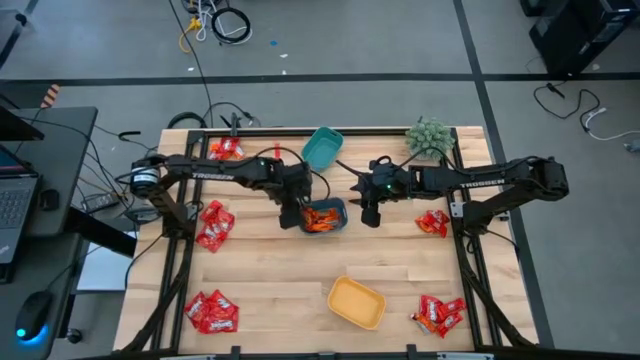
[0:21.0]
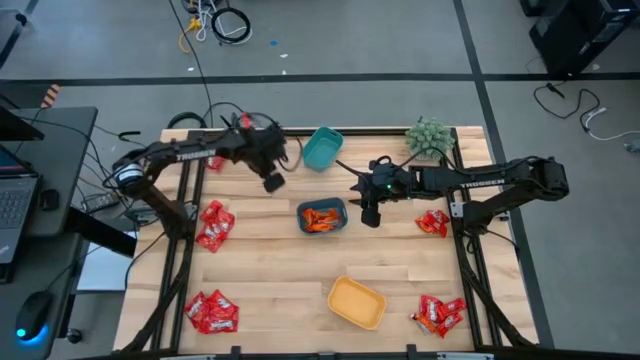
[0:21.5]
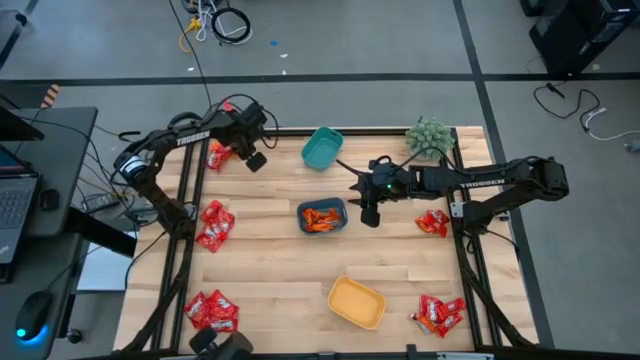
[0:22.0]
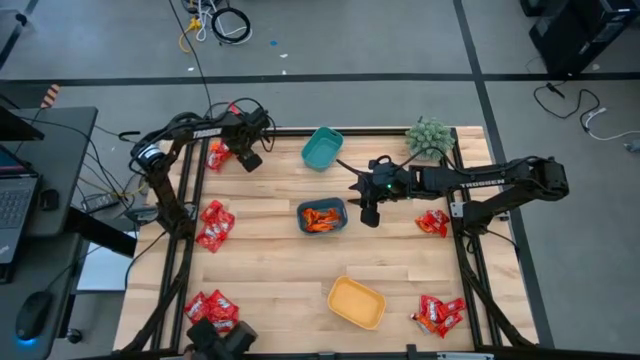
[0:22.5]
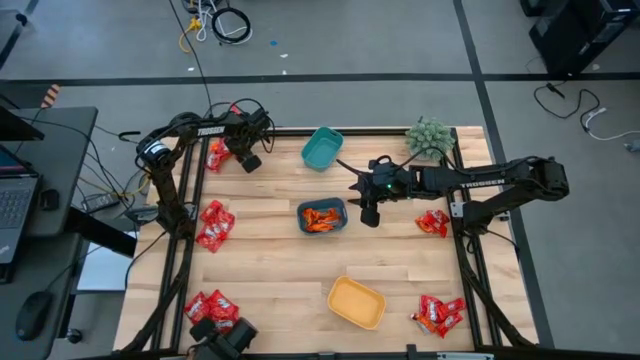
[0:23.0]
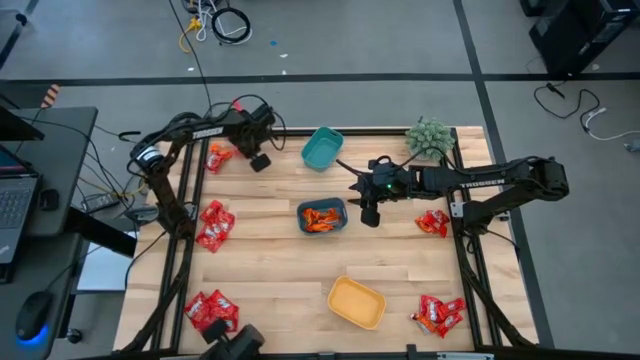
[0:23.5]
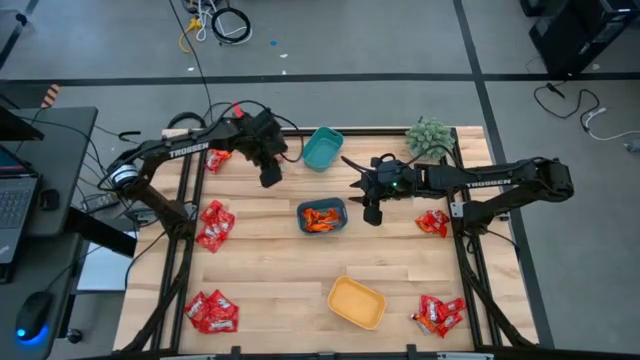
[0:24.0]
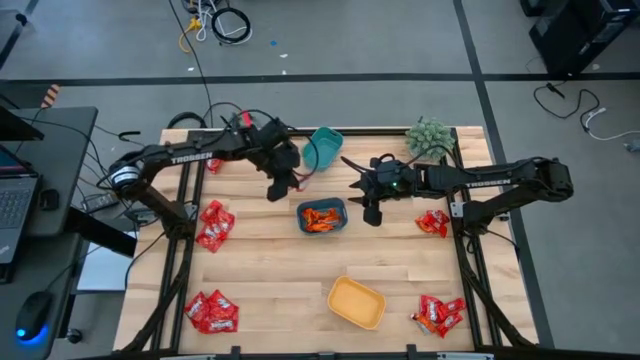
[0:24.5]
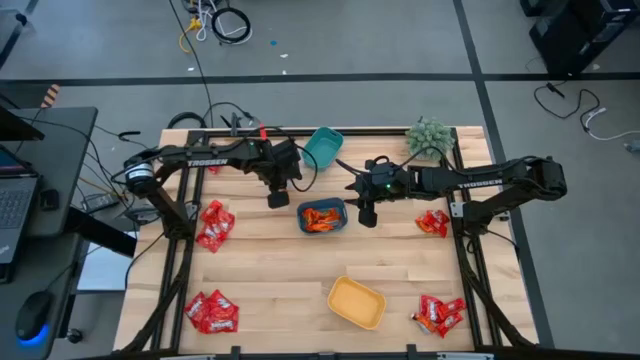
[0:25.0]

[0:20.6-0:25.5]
Task: Sort candy
Move the orange and red chocolate to the center

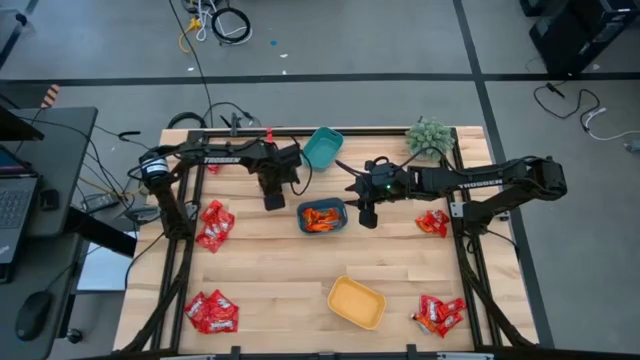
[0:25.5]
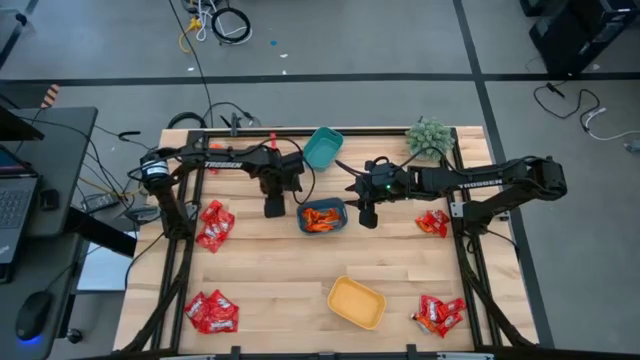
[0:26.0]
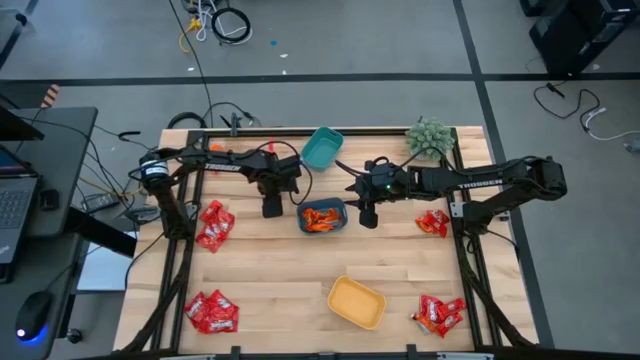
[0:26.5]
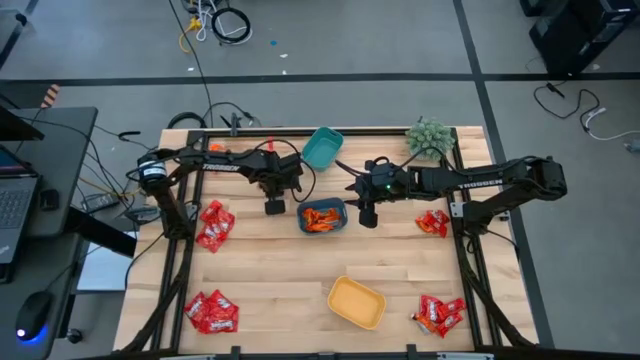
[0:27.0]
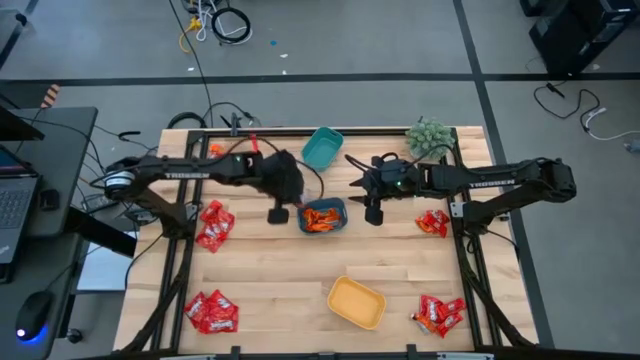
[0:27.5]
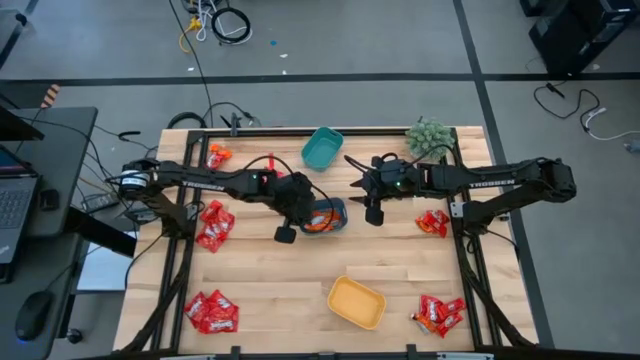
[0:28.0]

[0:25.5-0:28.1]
Put the orange chocolate into the blue bin

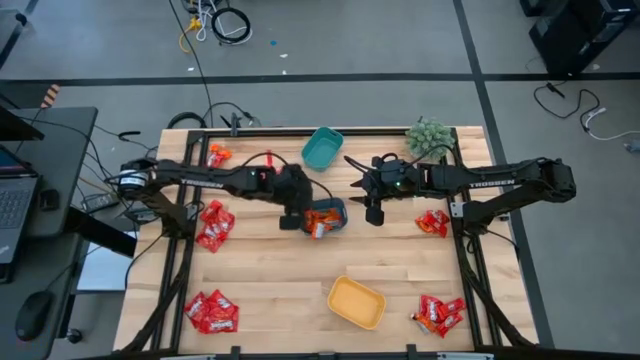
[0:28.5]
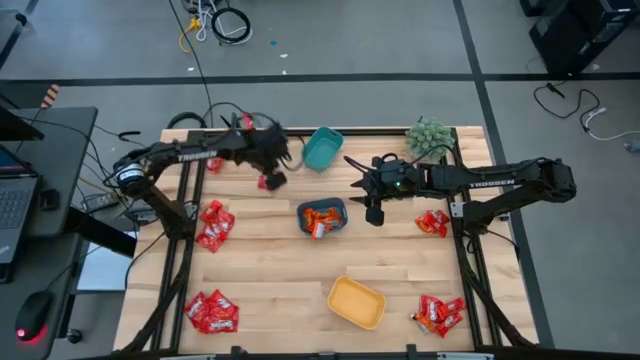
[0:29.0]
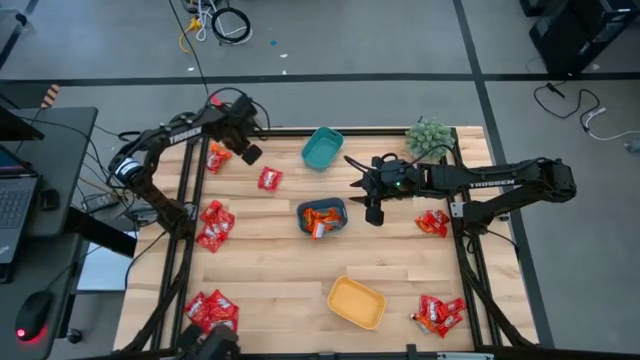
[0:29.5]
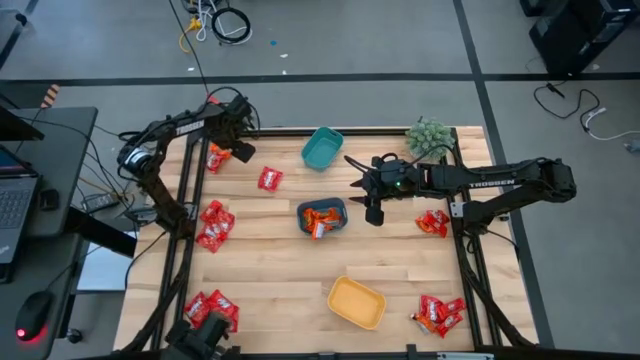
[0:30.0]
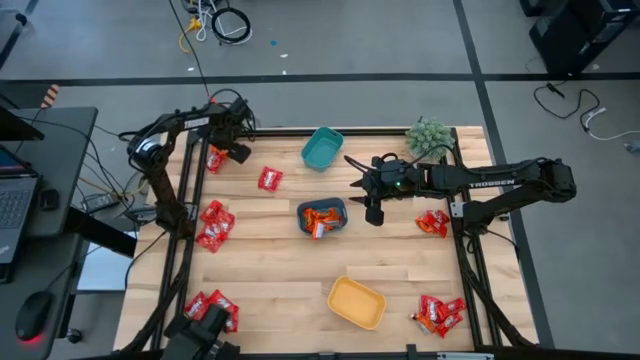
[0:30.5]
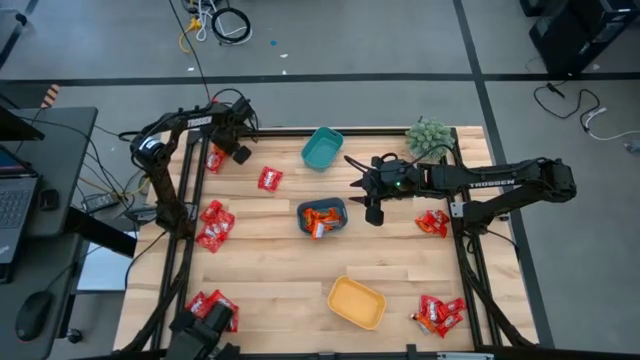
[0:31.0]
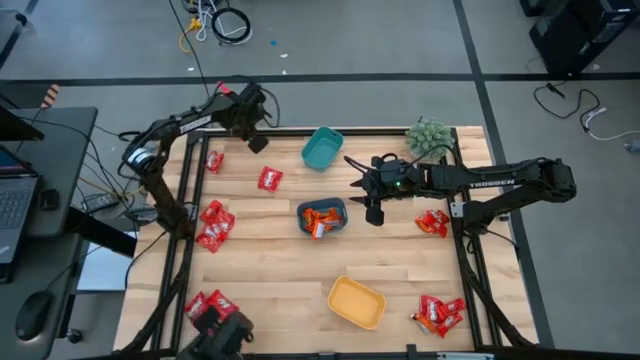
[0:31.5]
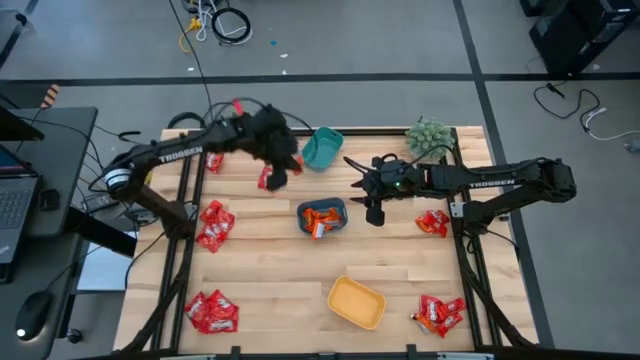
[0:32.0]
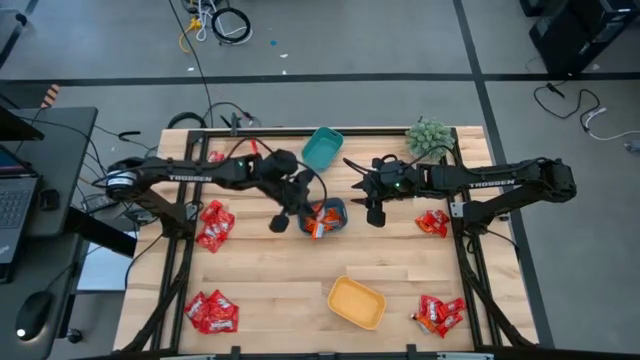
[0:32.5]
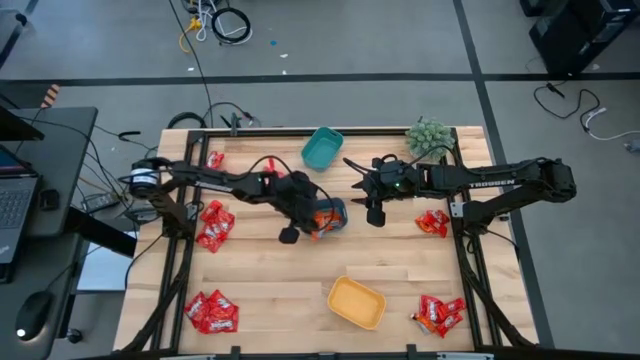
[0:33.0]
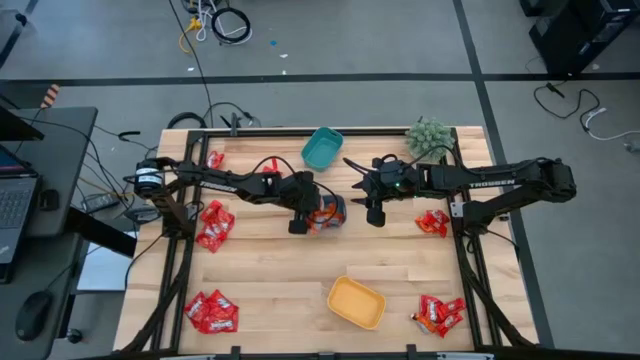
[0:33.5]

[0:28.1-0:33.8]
Put the orange chocolate into the blue bin

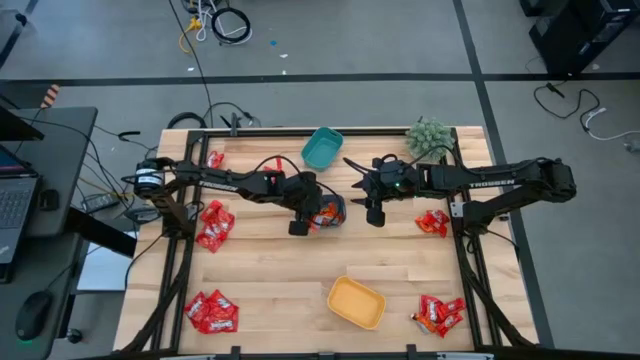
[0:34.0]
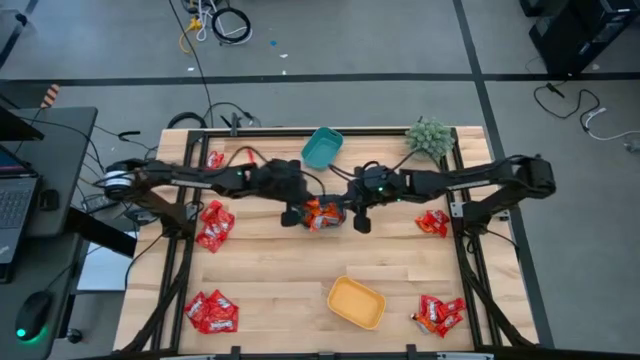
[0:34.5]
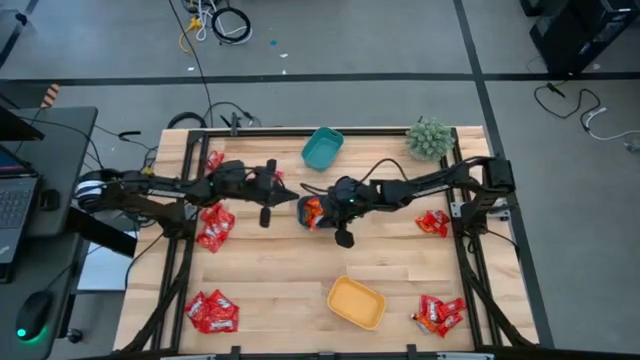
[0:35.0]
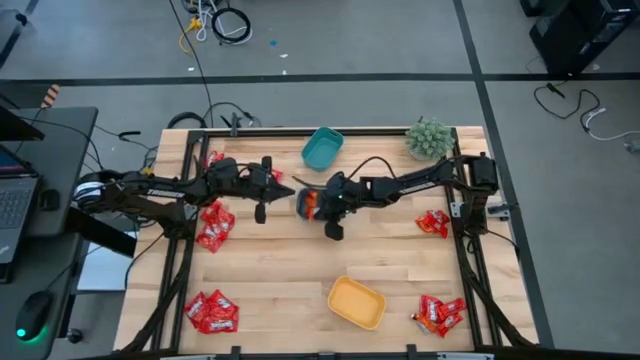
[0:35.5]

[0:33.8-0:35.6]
Move the blue bin to the top center

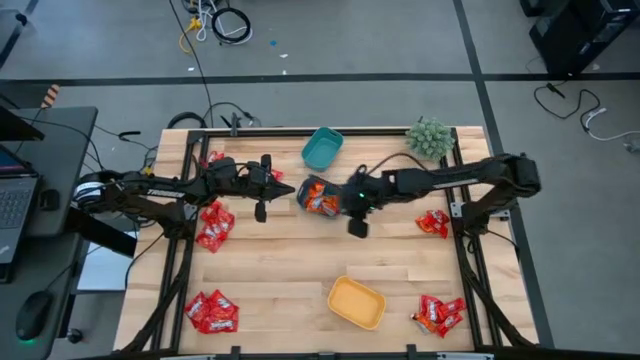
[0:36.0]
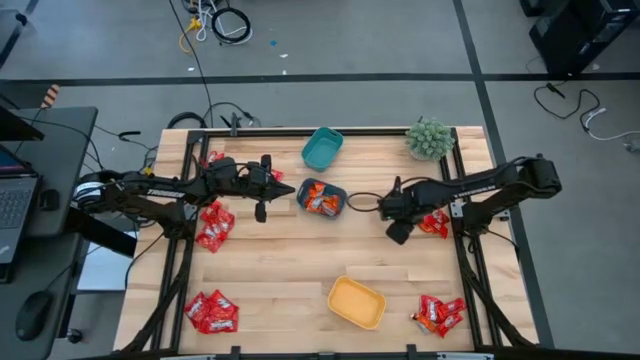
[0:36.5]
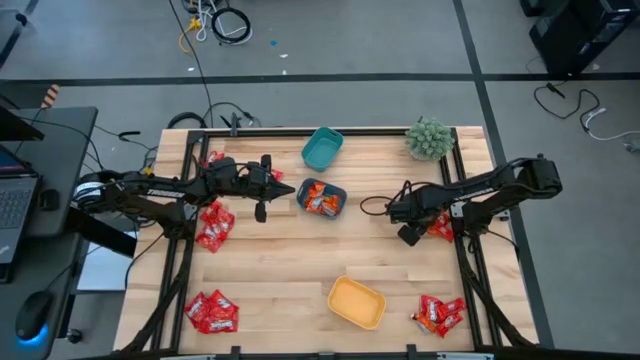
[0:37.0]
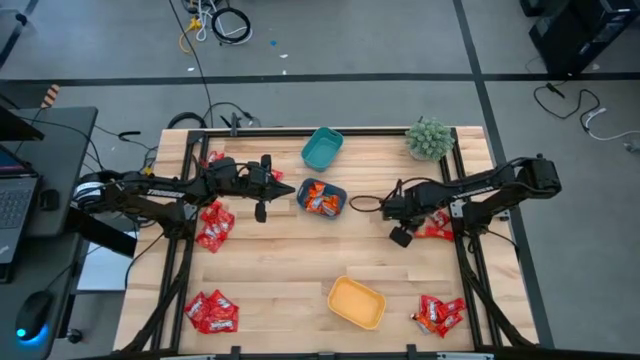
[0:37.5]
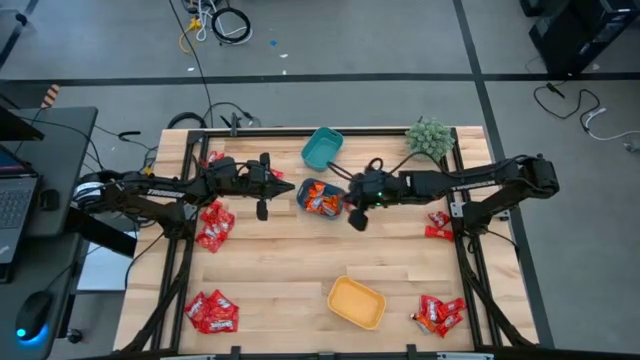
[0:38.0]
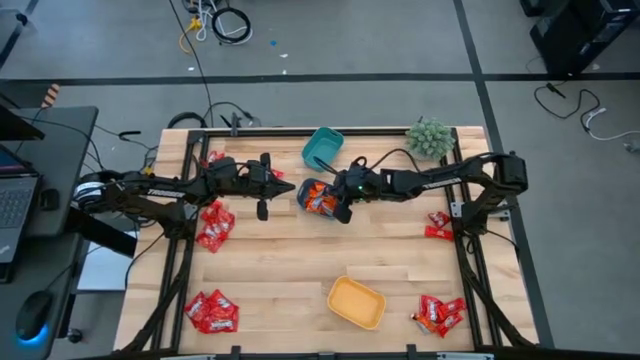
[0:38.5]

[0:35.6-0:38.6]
Put the orange chocolate into the blue bin

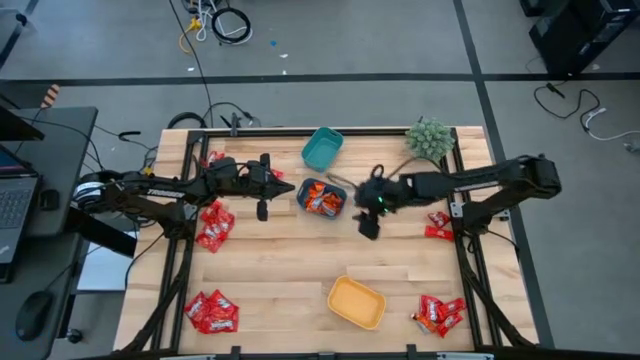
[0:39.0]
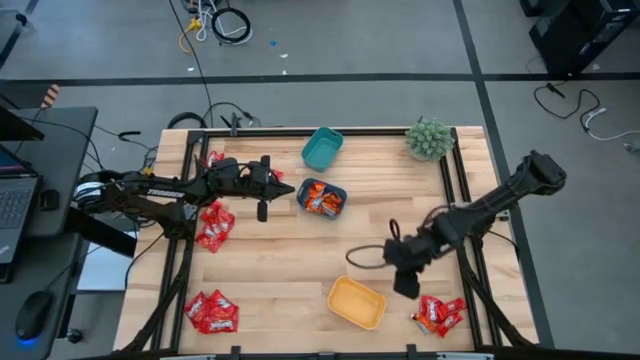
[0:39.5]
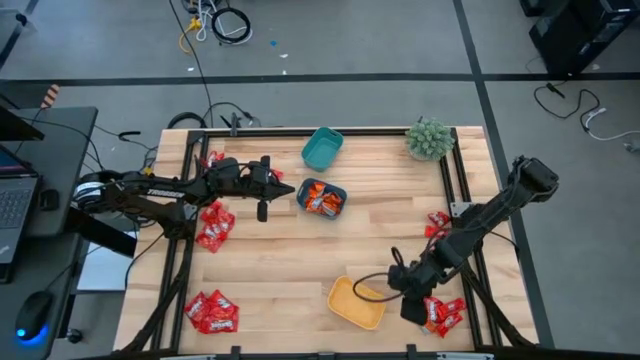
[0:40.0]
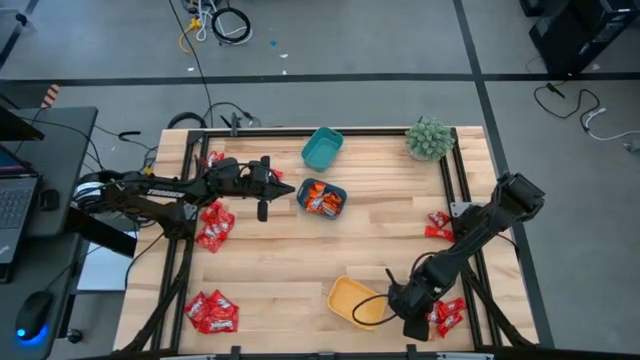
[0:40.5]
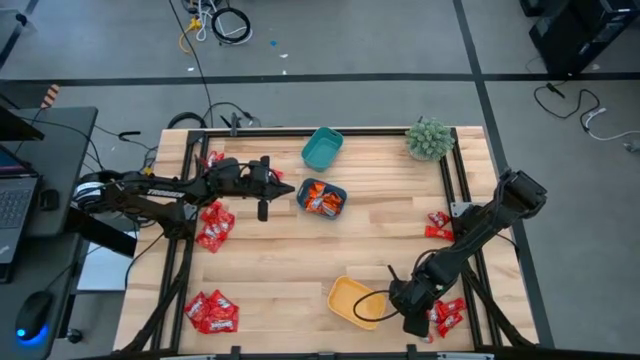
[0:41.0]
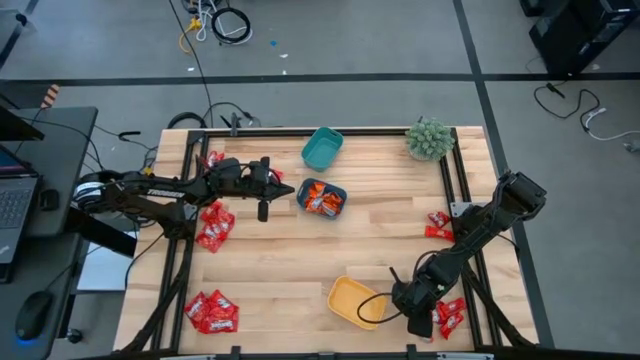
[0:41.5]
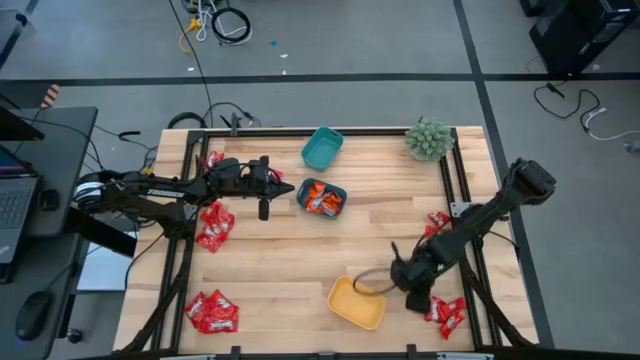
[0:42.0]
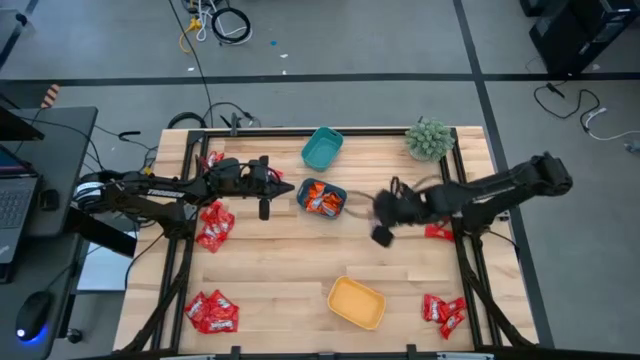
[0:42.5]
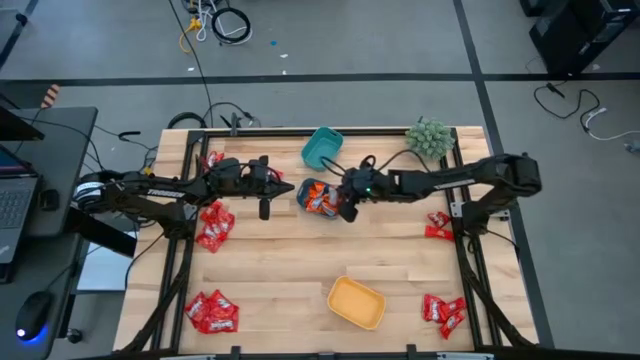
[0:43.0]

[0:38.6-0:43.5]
Put the orange chocolate into the blue bin
